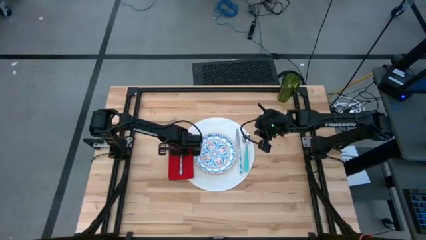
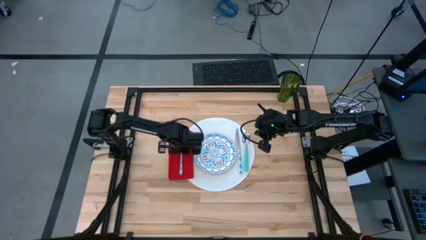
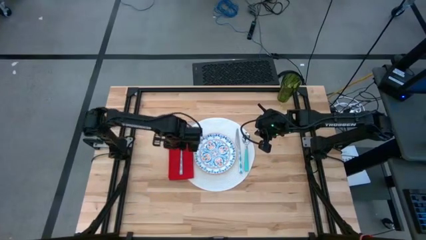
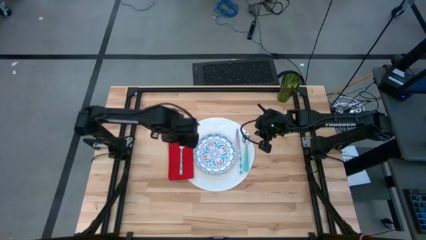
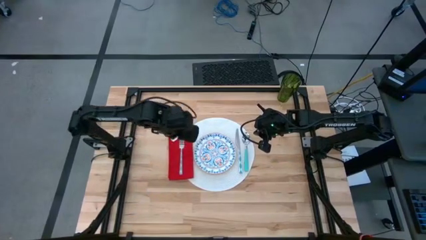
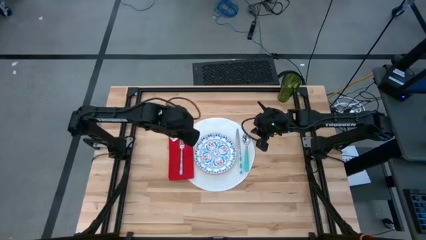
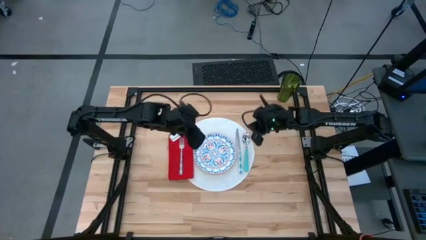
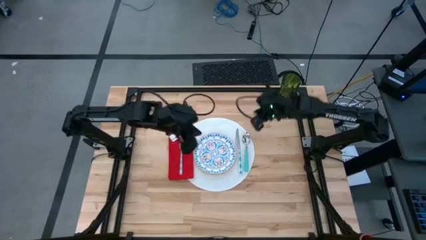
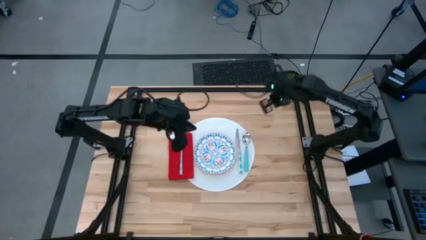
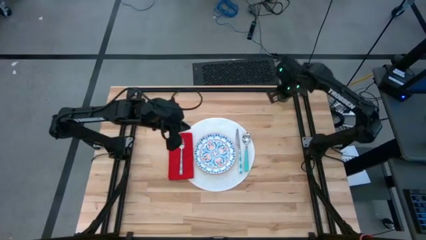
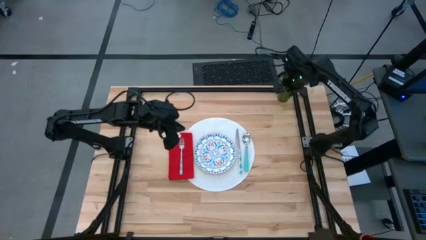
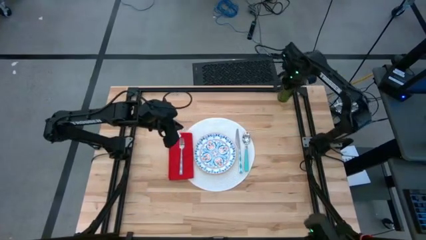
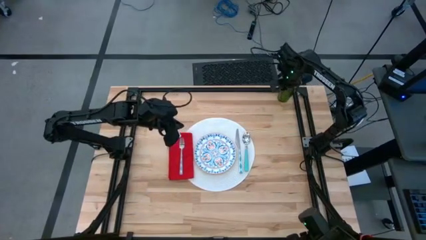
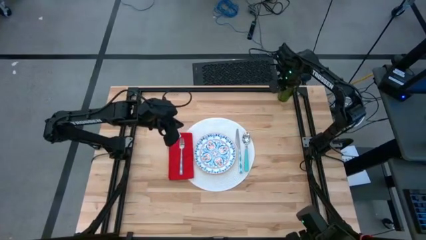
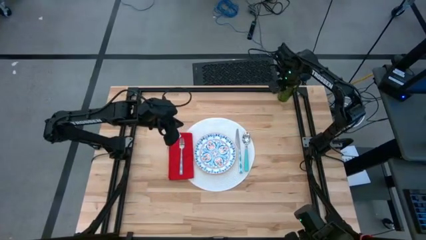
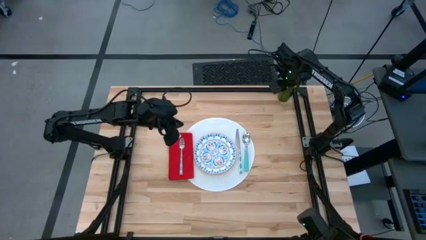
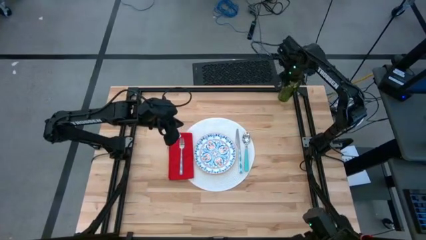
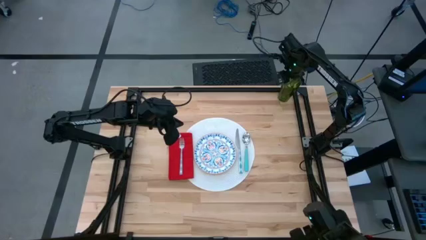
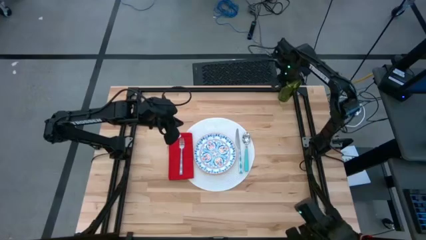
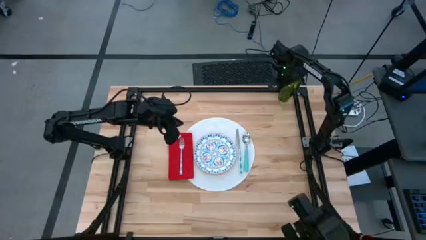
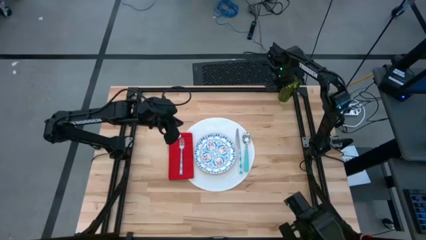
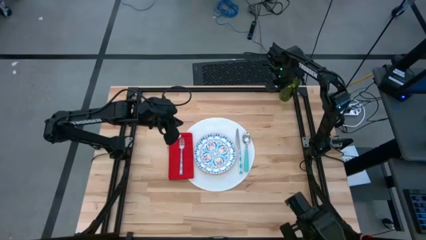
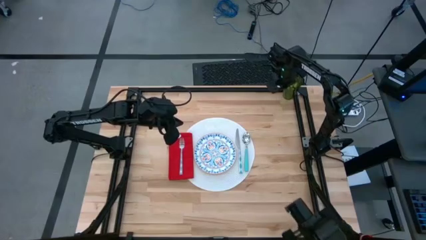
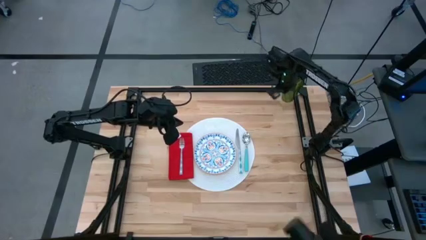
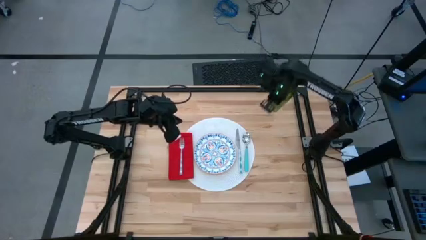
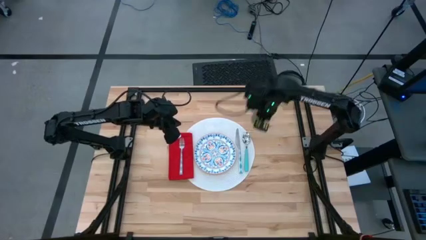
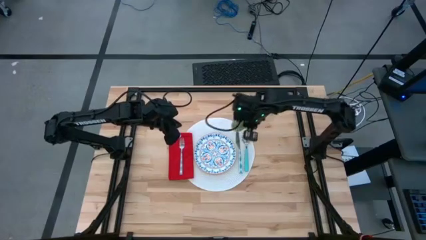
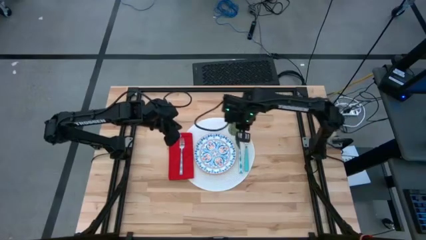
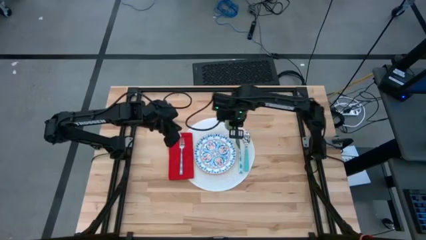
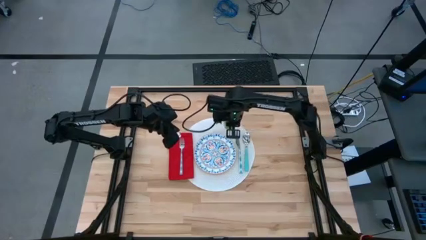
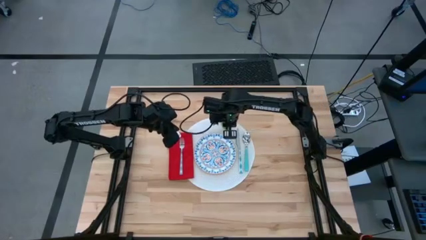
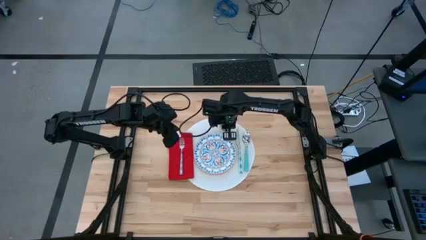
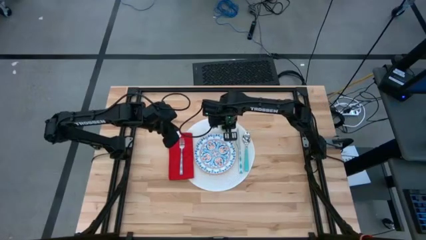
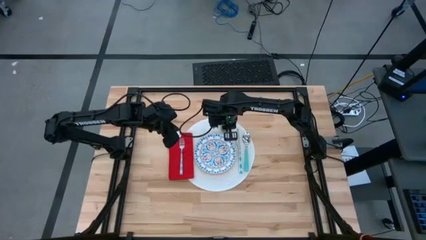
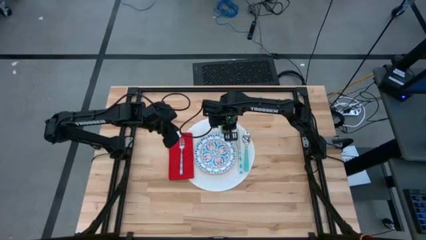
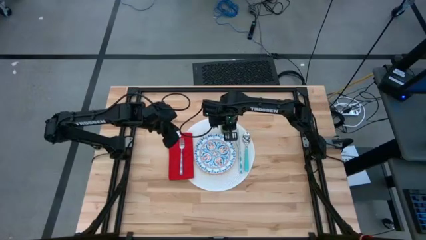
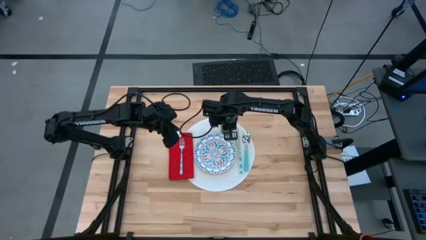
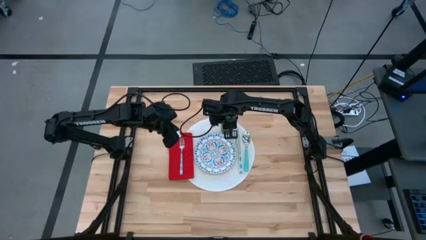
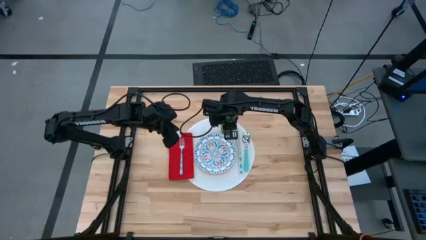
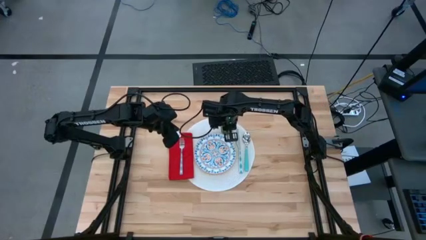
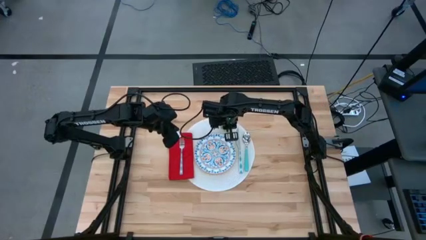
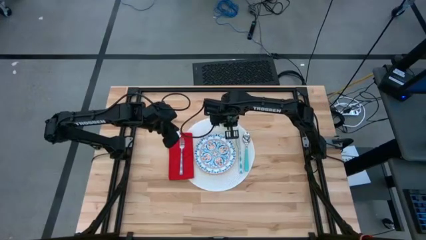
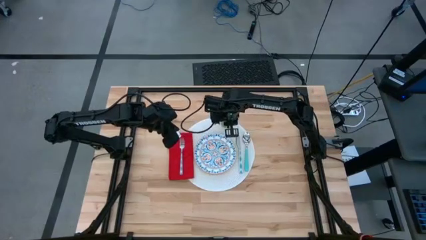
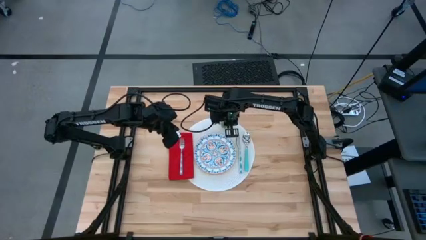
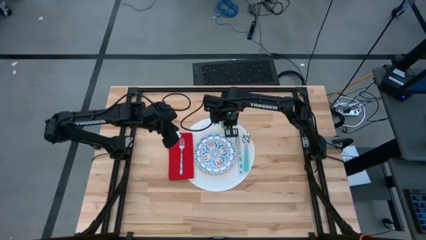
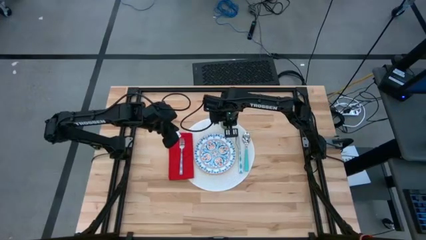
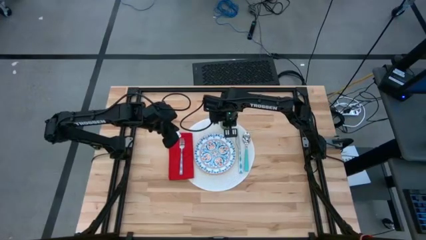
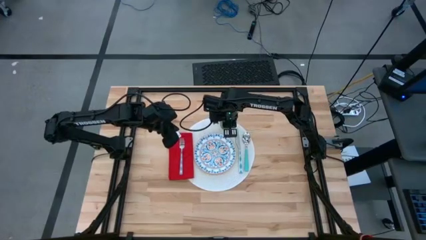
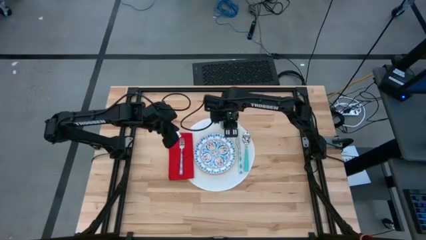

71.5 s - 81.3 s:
Task: Set table place
Put the green glass at the top right of the white placemat

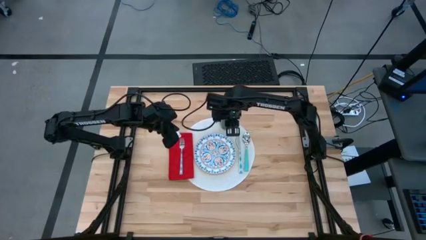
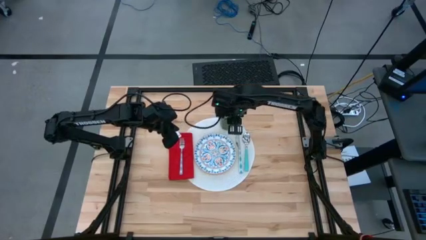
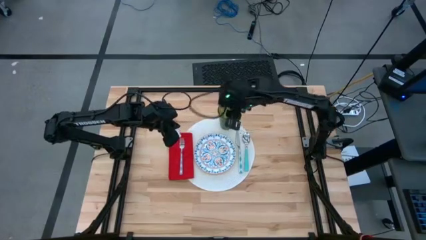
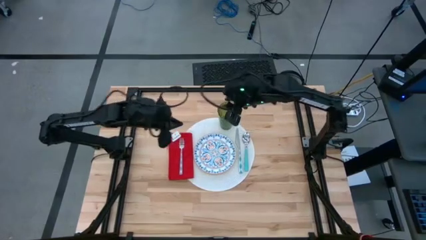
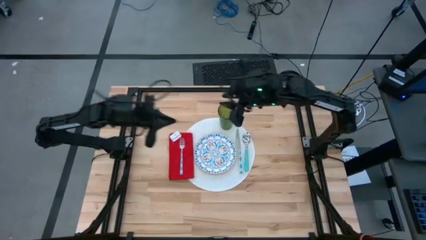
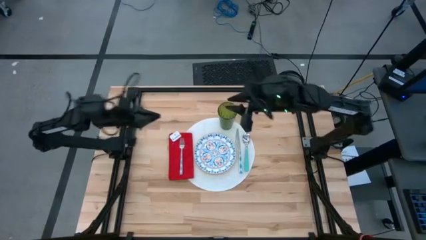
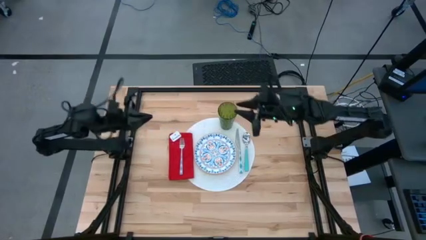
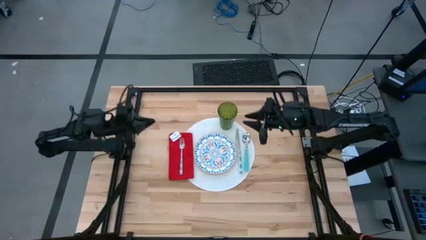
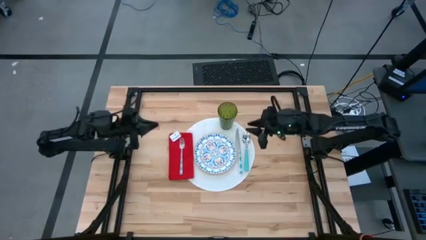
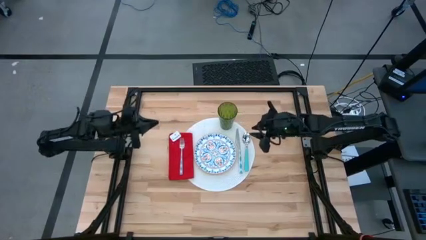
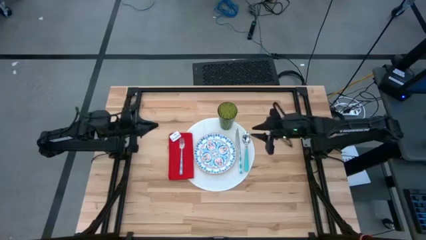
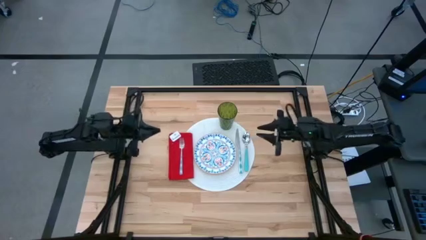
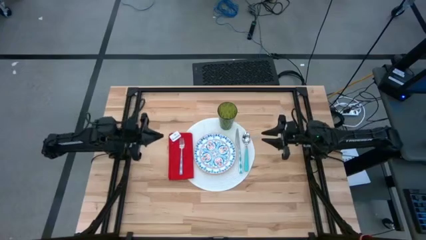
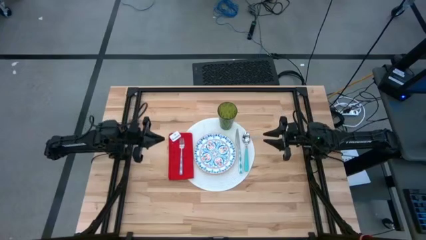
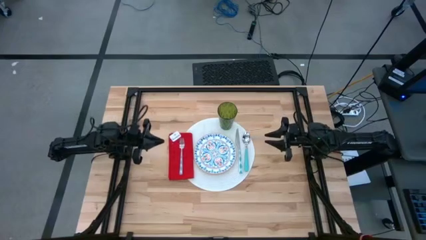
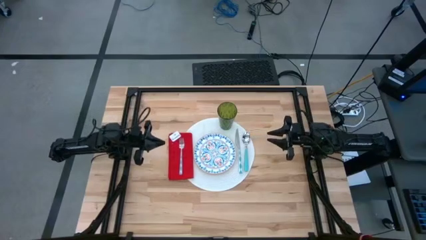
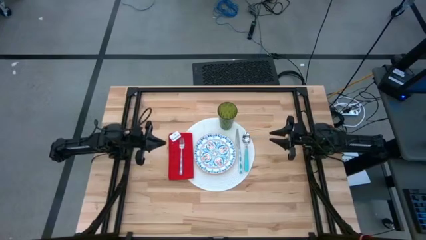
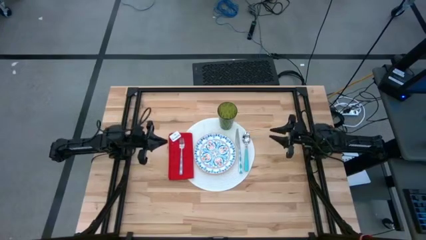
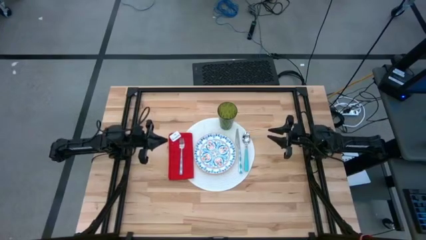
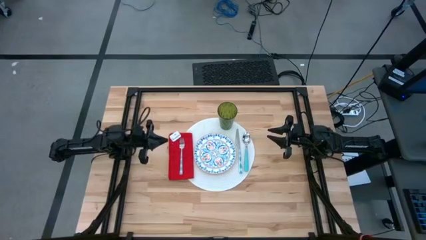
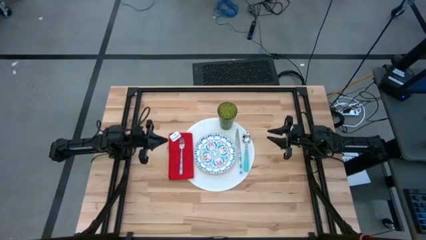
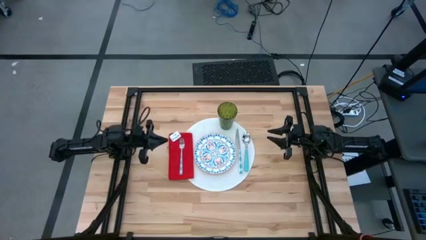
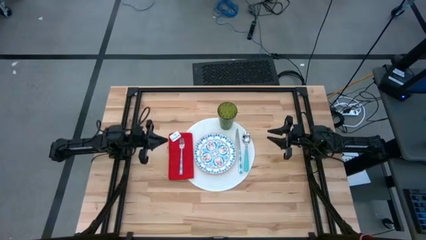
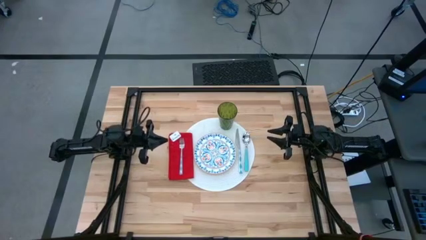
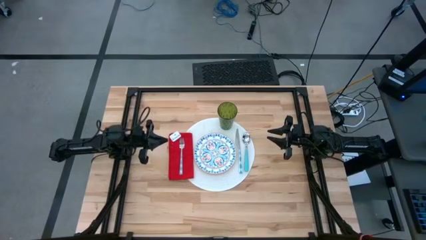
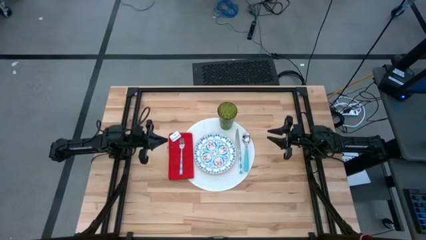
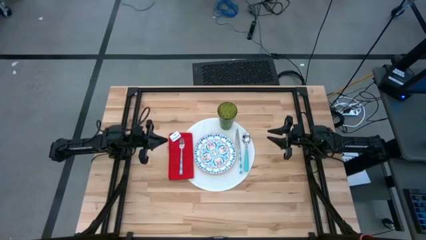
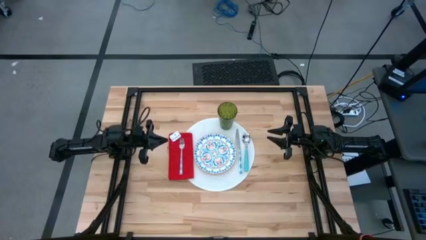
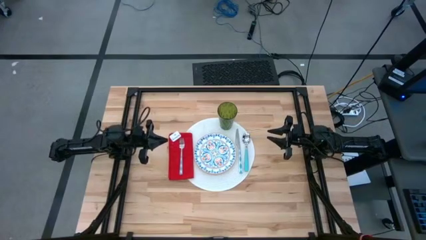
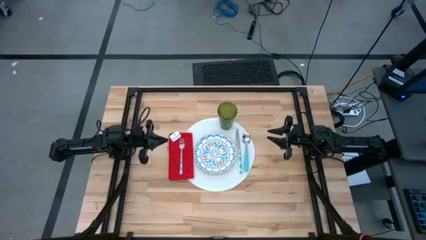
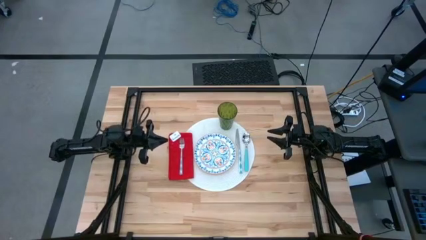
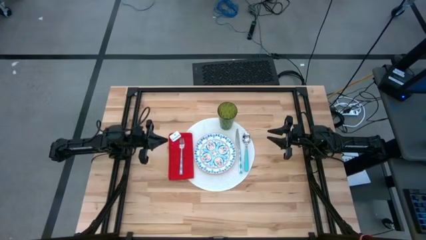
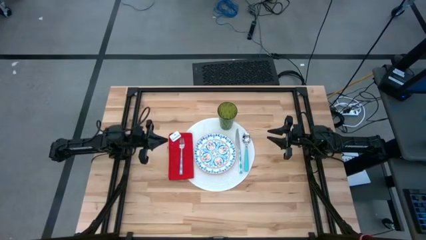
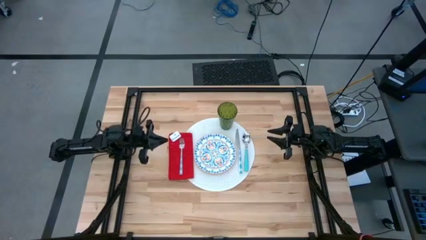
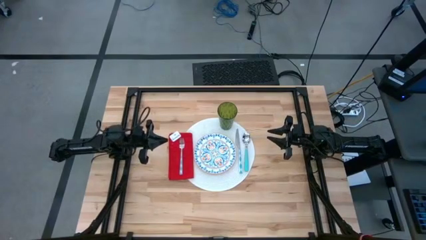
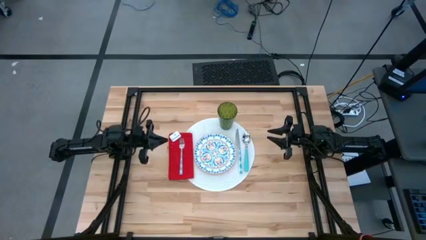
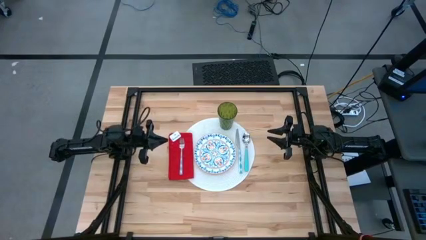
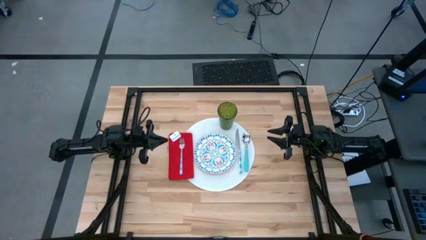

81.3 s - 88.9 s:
Return to Home Position
